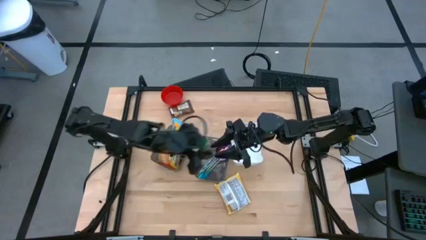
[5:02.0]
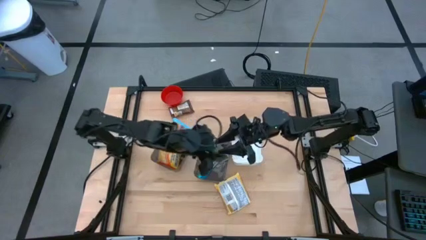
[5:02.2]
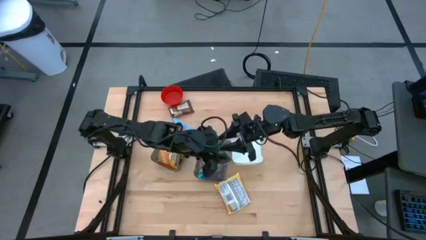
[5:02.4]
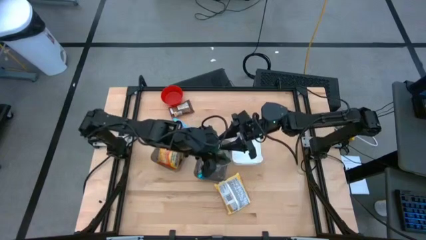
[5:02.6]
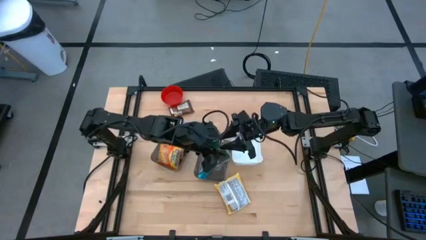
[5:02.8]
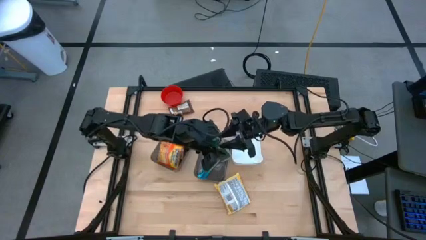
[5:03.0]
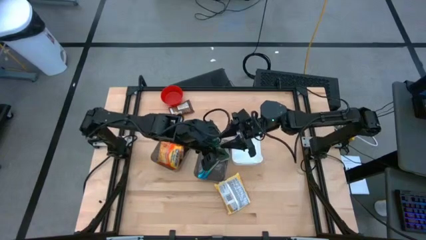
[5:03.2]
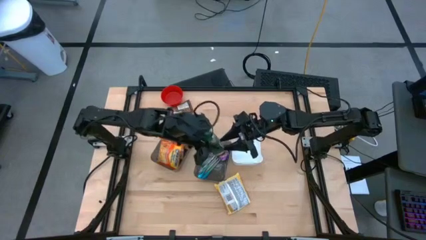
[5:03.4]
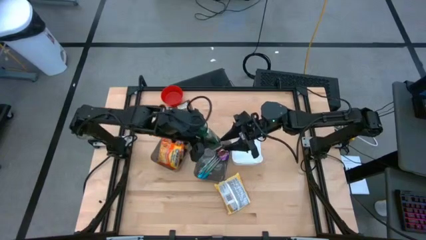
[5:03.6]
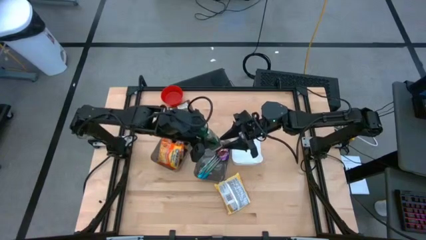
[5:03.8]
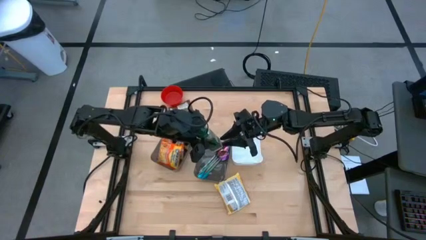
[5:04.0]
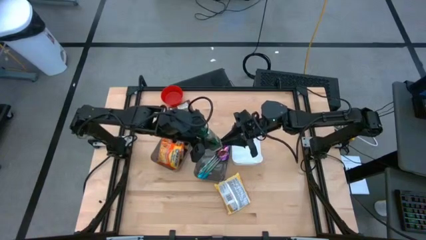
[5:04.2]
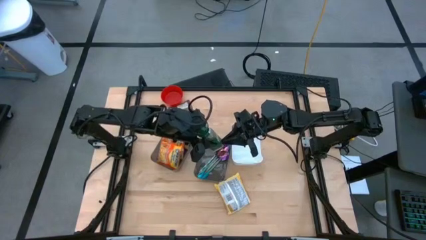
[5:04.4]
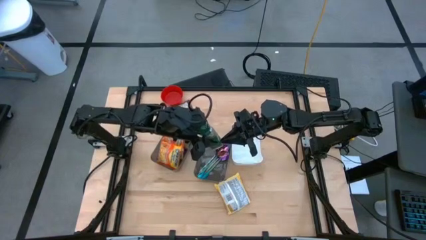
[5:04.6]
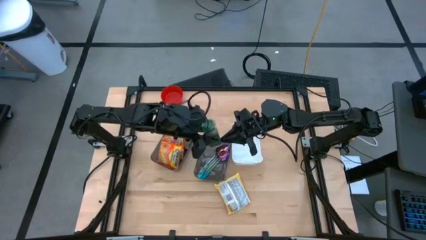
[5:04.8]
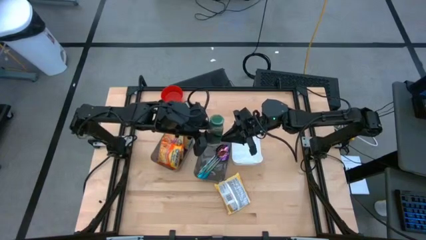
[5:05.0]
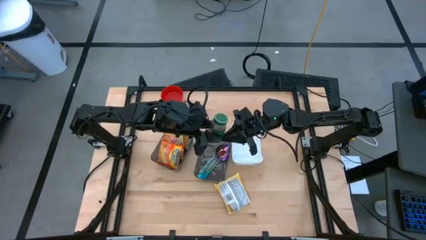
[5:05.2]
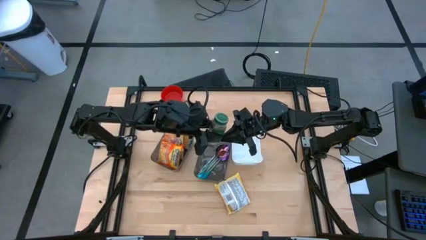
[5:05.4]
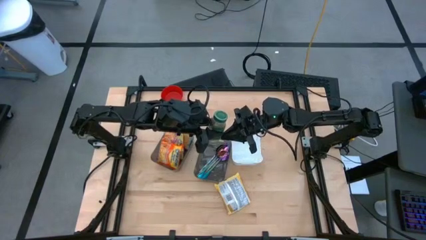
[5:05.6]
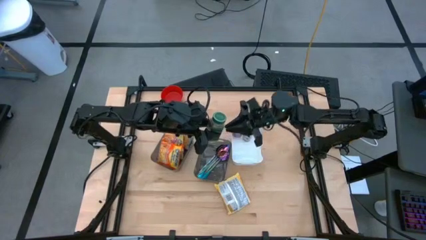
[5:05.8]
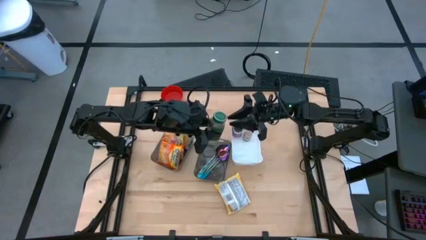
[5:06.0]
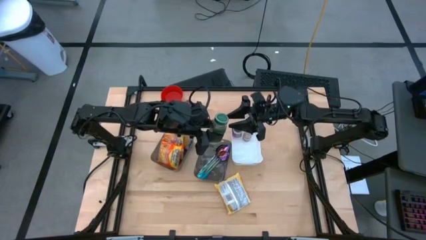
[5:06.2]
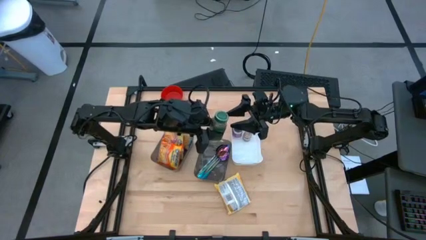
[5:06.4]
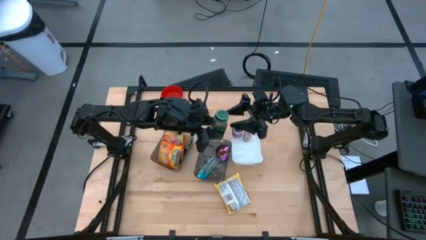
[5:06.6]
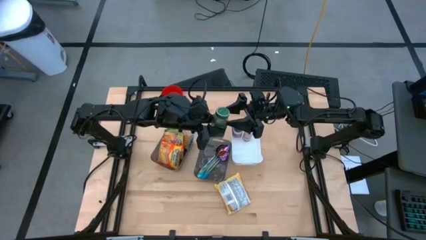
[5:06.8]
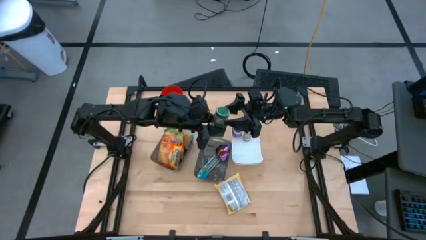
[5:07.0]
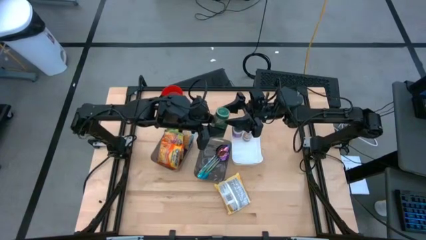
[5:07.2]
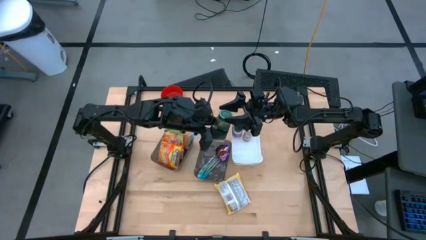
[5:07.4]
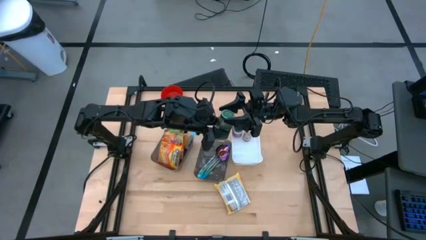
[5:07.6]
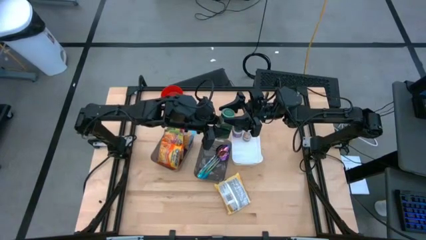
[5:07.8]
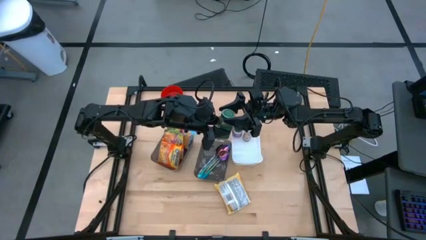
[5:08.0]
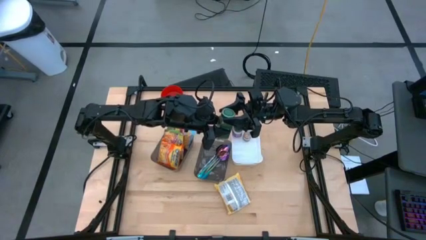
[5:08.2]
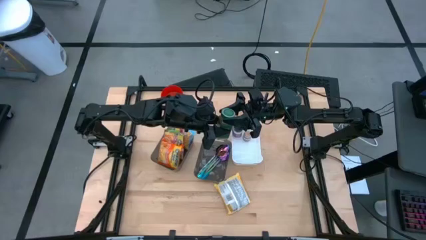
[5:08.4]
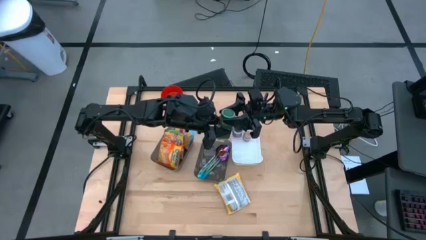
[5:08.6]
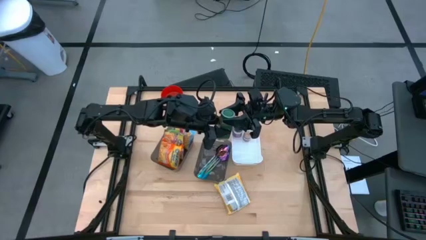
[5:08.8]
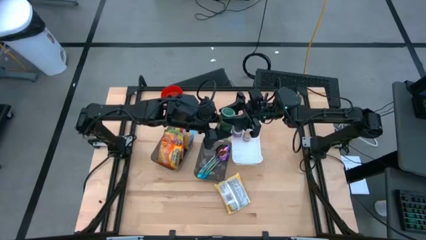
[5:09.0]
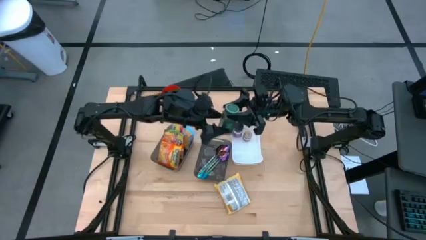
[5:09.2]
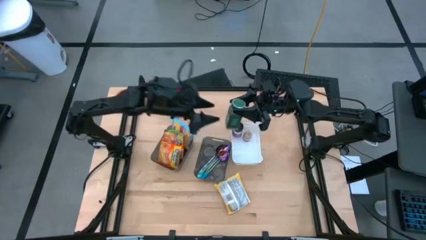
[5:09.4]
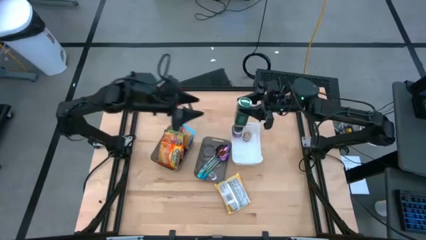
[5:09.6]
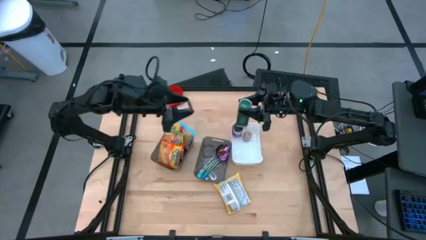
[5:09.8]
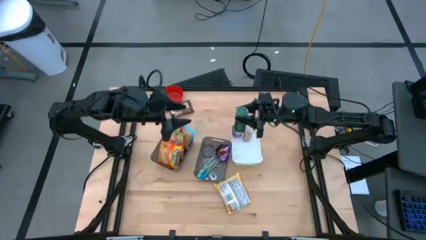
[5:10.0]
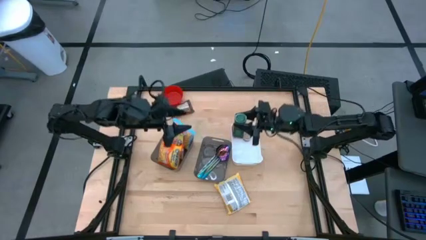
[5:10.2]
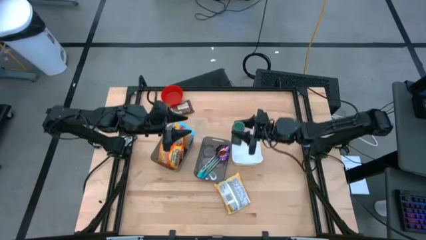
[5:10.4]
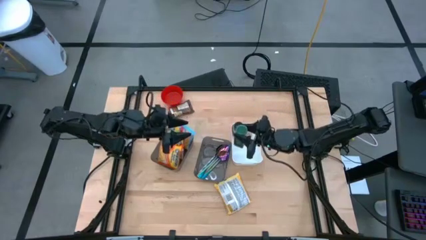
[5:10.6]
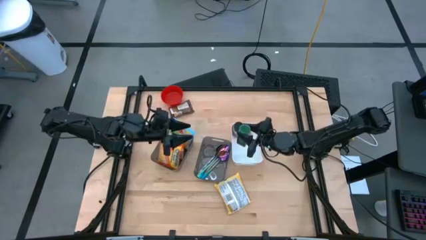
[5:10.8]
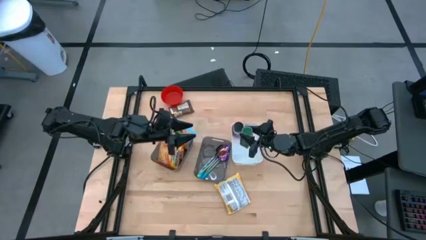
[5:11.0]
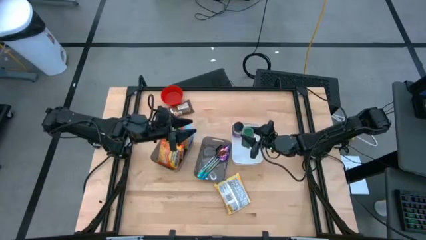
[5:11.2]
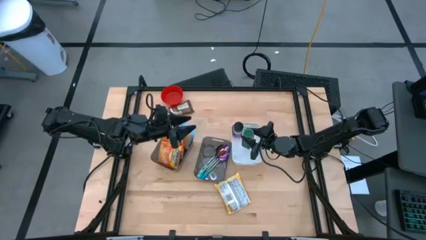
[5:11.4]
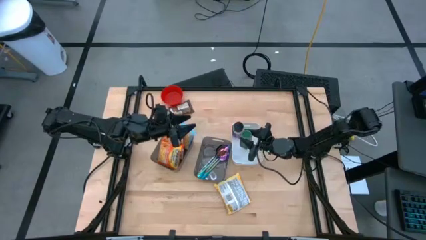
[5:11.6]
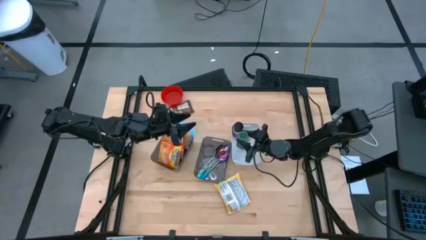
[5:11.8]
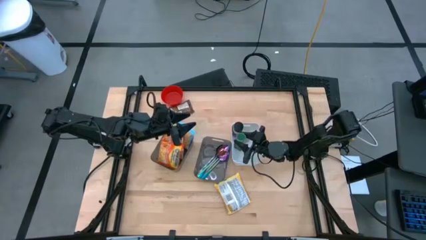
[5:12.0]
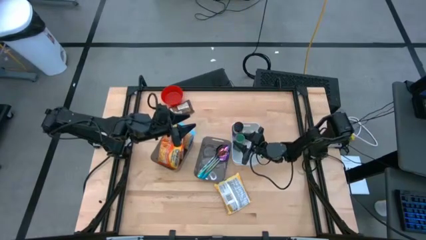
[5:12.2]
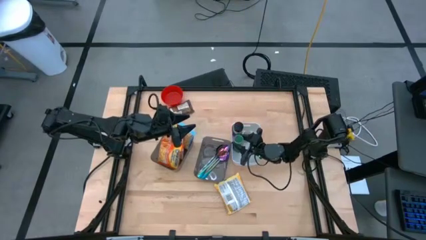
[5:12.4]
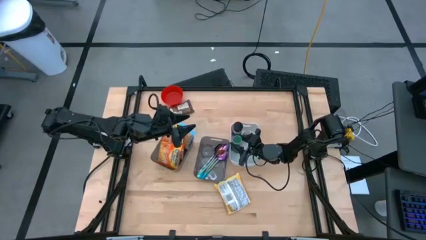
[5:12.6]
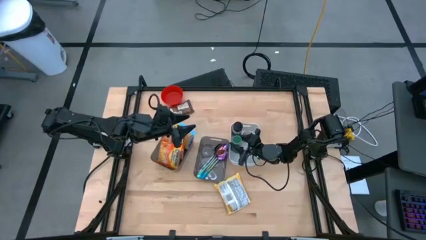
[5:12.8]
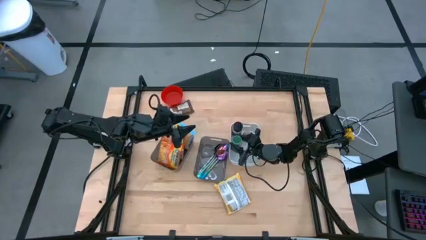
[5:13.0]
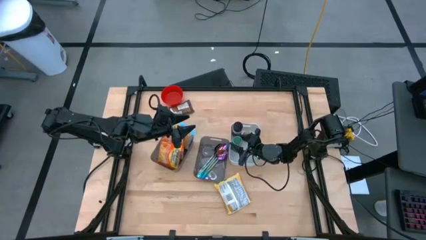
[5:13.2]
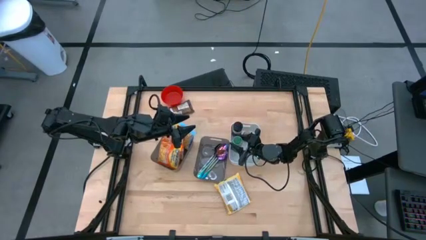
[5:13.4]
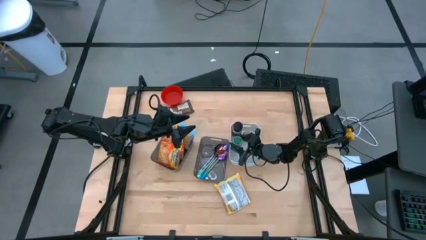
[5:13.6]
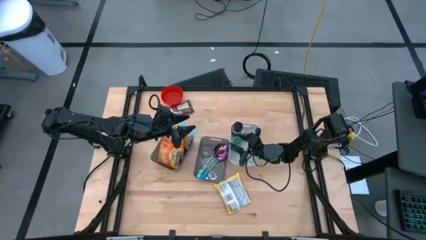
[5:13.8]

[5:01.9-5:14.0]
Task: Pick & Place Food Item
Put the green bottle into the white bin

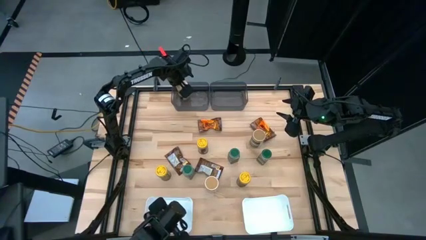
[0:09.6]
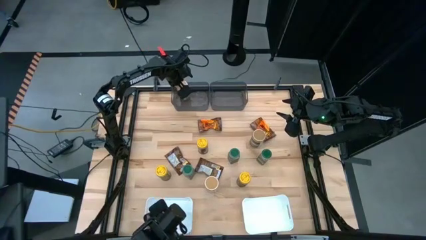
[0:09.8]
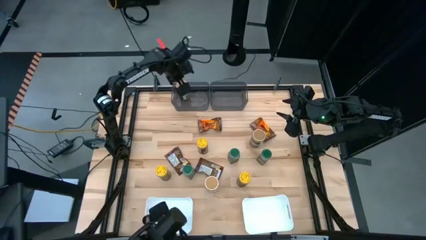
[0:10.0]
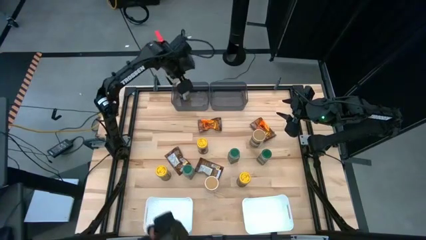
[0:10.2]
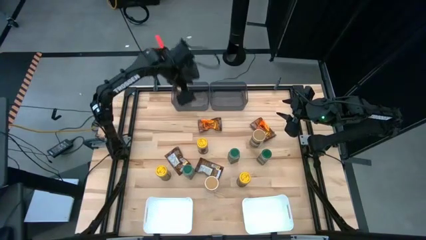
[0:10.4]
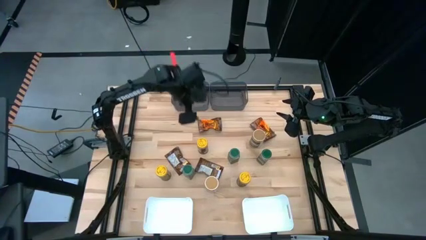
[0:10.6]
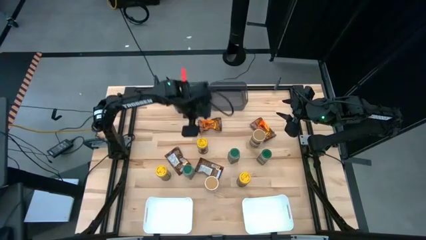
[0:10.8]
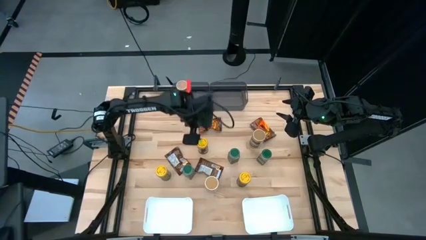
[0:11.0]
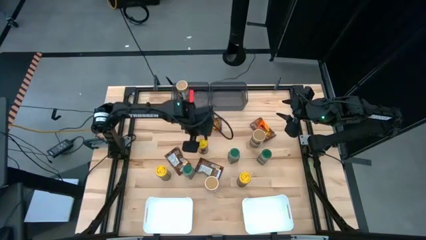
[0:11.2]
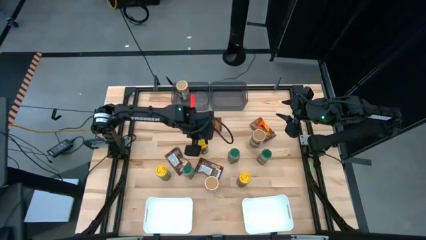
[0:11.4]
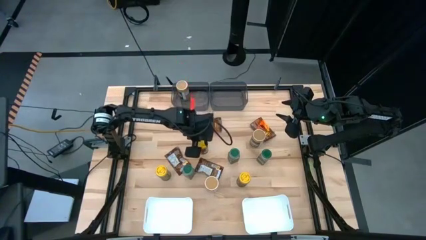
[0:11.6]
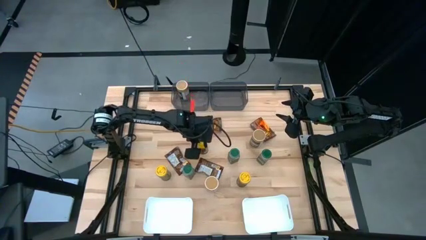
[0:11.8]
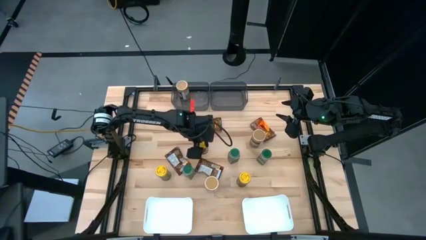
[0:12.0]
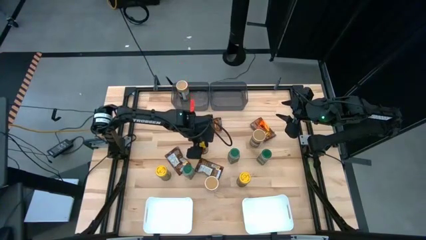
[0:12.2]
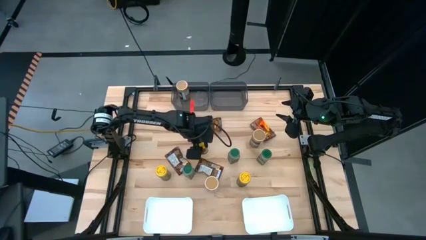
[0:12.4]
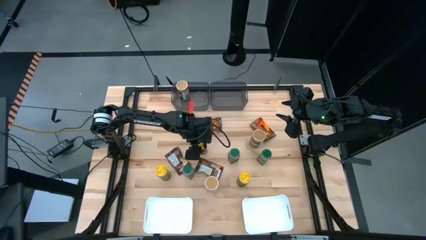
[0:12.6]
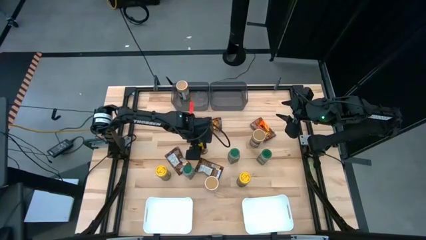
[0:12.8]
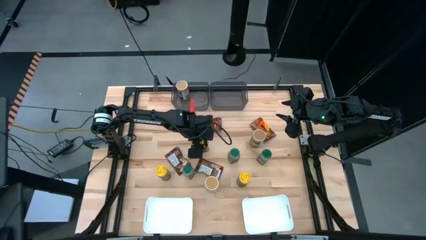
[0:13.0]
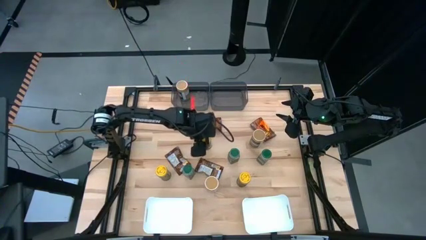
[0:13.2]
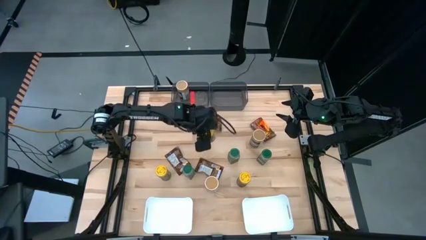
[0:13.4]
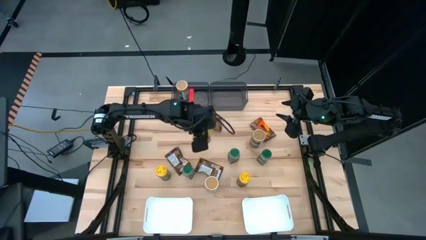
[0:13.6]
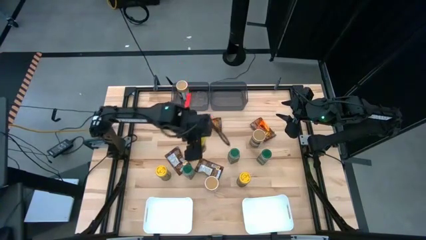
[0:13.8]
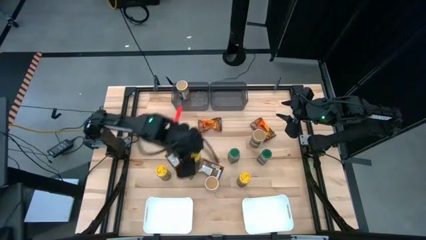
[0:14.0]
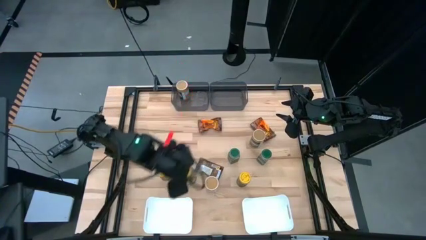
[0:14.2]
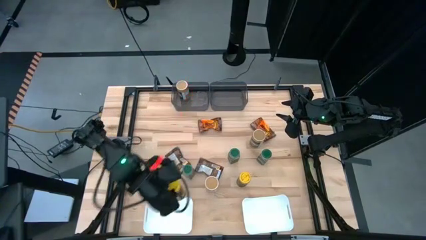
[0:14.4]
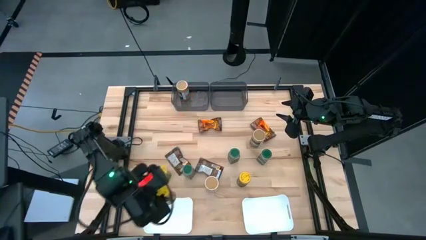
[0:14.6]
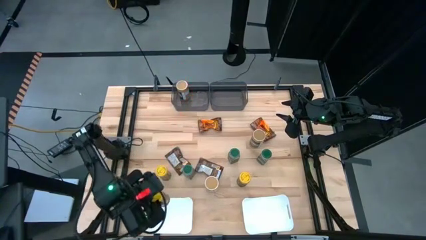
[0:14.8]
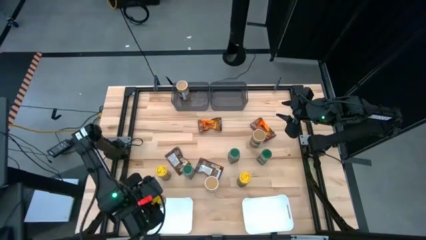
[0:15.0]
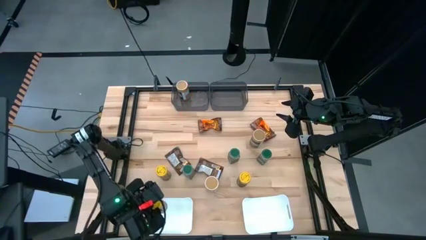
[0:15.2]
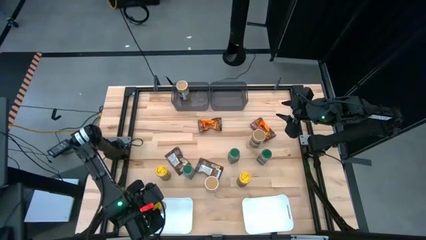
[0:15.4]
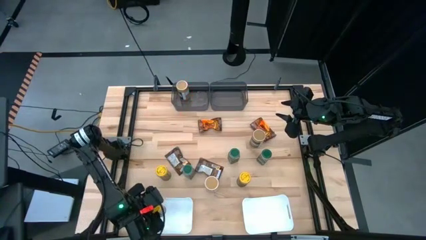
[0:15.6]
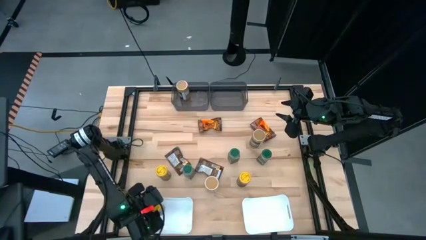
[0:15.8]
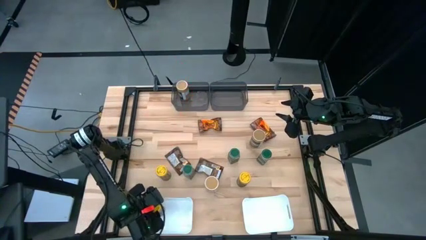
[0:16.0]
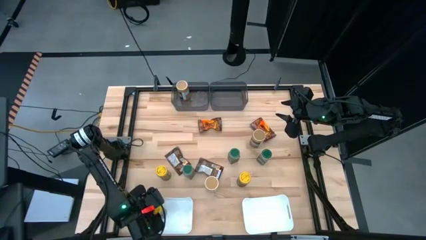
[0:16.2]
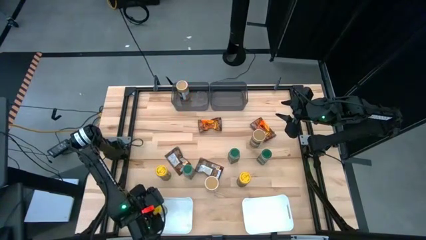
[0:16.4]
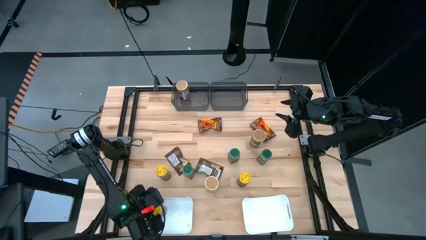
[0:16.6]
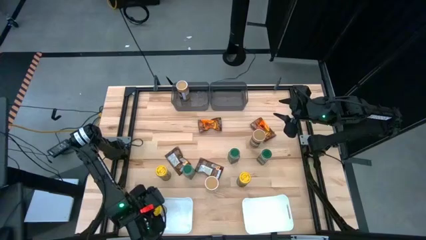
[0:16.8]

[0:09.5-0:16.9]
Task: Sort spices by type
Put the top yellow seasoning bottle into the left white bin
